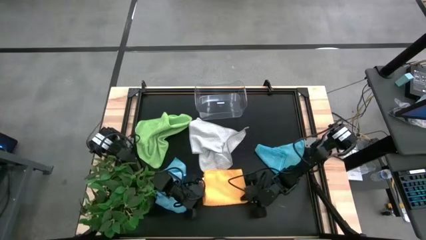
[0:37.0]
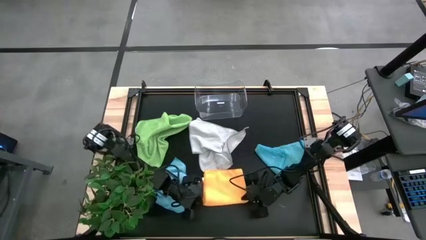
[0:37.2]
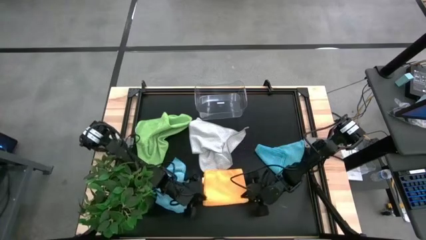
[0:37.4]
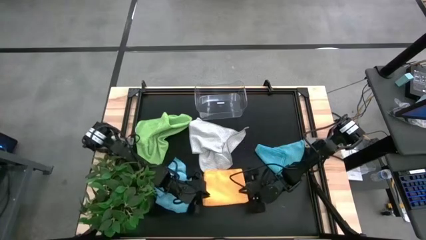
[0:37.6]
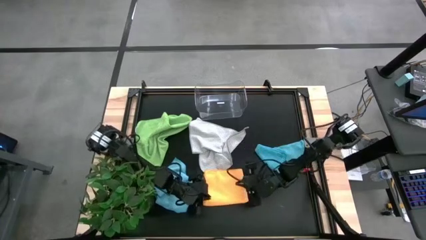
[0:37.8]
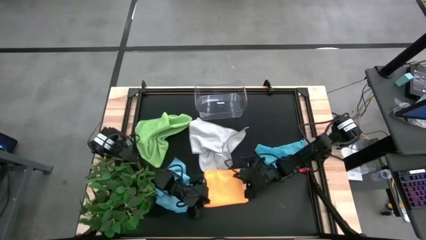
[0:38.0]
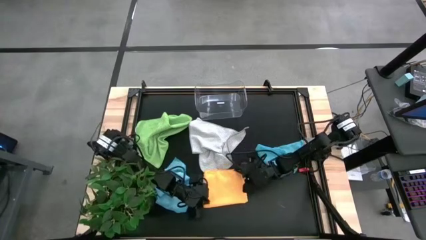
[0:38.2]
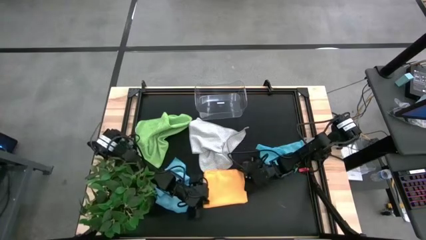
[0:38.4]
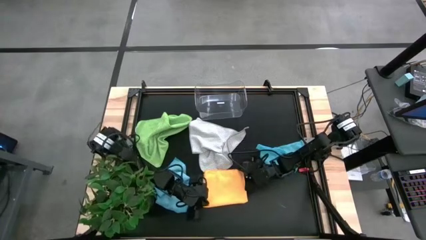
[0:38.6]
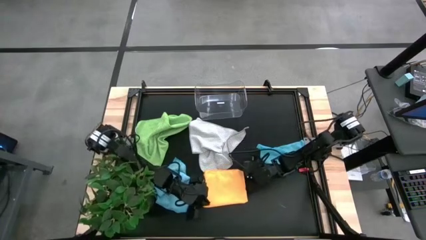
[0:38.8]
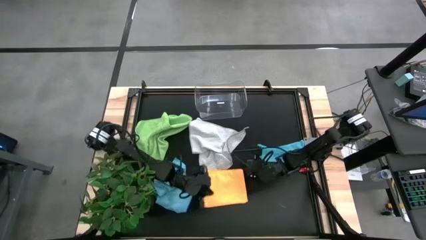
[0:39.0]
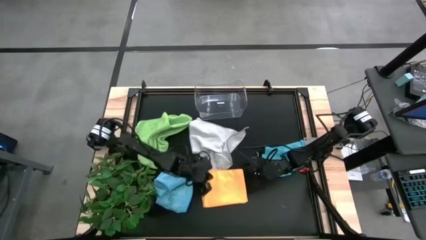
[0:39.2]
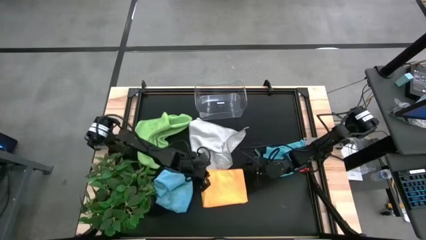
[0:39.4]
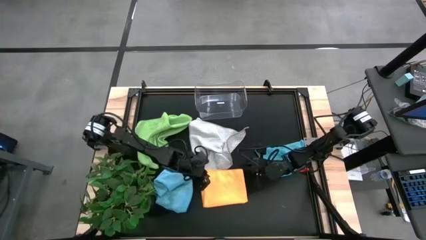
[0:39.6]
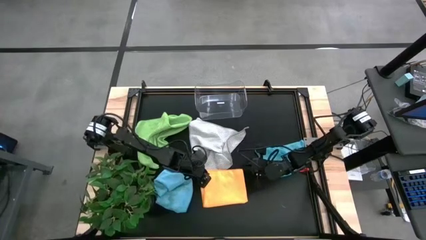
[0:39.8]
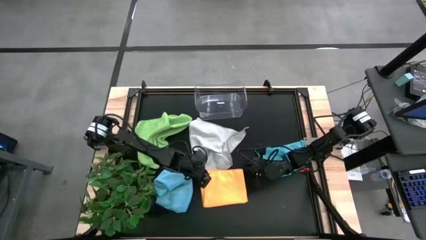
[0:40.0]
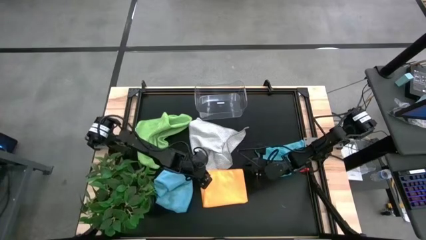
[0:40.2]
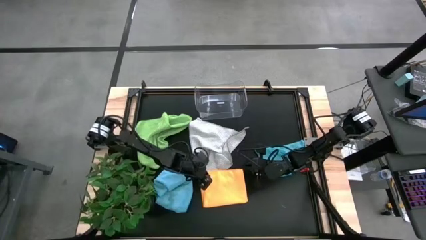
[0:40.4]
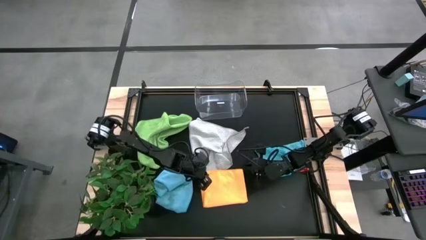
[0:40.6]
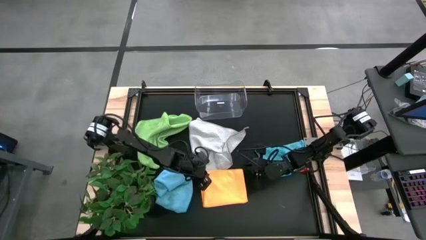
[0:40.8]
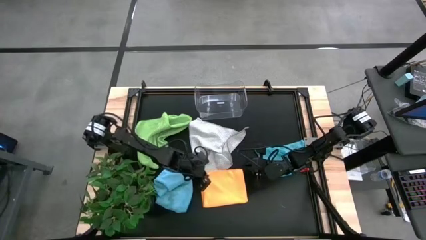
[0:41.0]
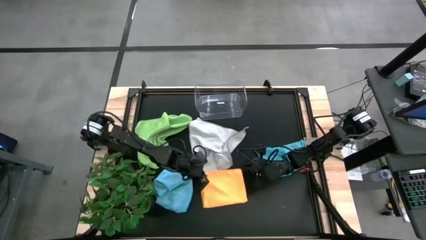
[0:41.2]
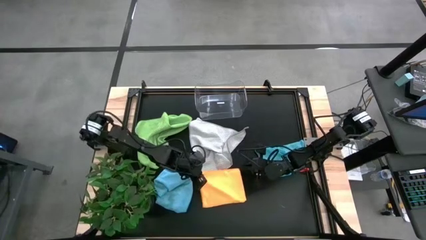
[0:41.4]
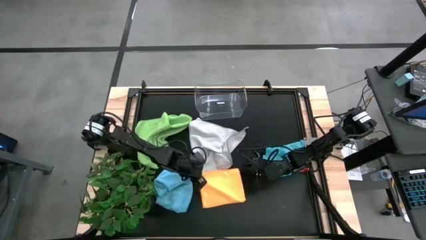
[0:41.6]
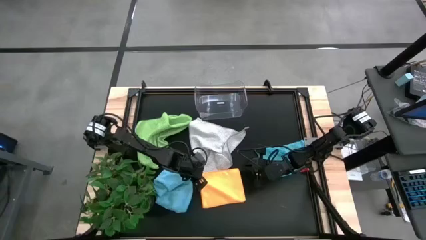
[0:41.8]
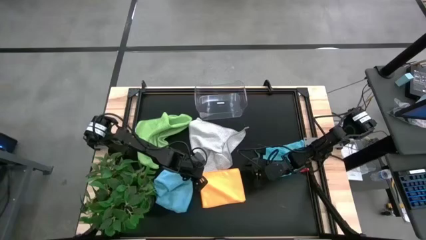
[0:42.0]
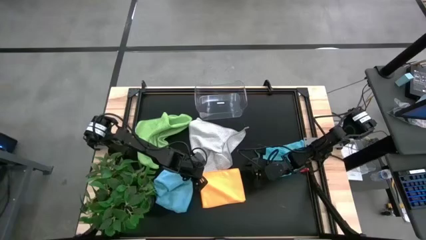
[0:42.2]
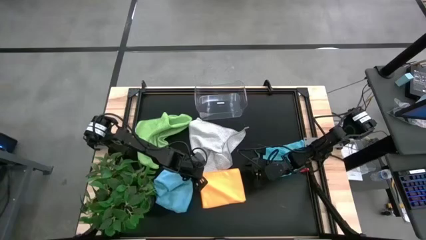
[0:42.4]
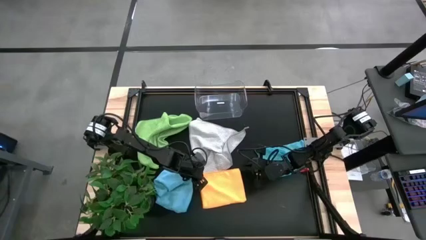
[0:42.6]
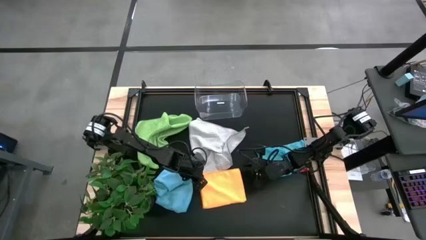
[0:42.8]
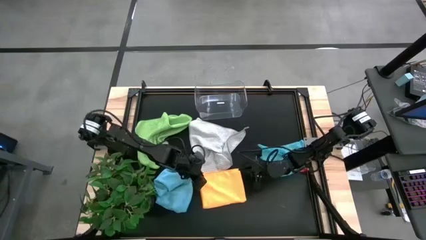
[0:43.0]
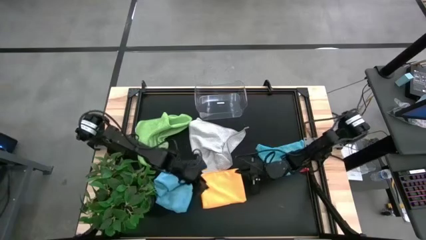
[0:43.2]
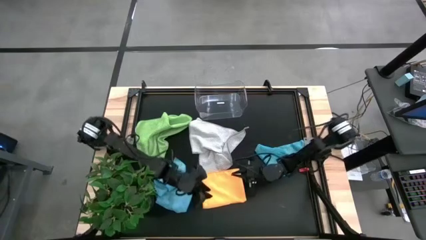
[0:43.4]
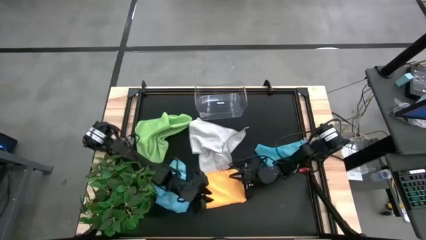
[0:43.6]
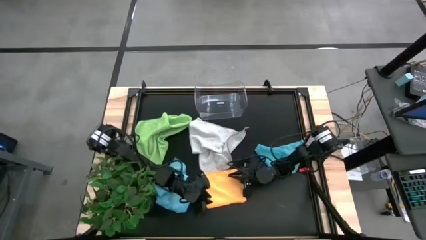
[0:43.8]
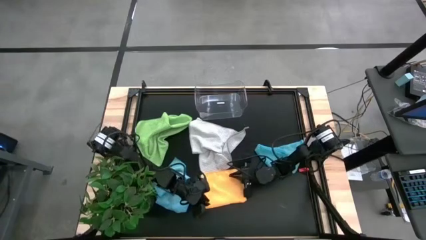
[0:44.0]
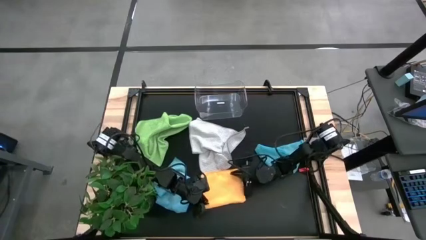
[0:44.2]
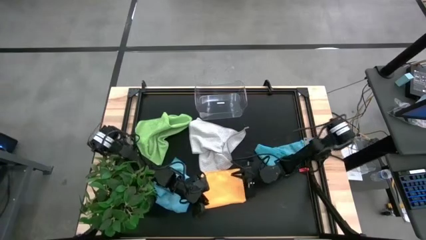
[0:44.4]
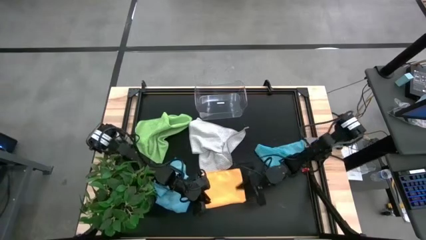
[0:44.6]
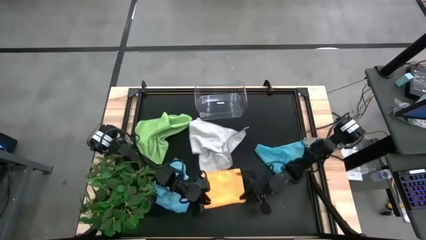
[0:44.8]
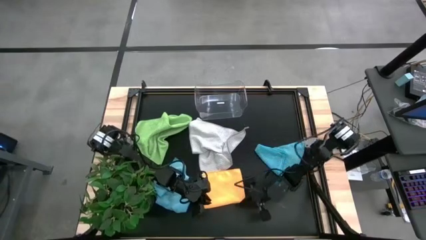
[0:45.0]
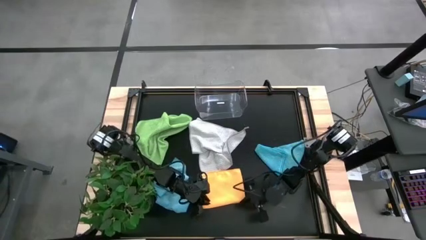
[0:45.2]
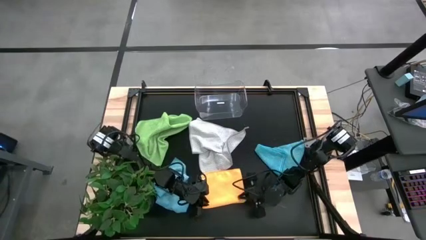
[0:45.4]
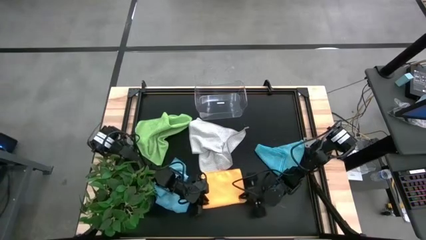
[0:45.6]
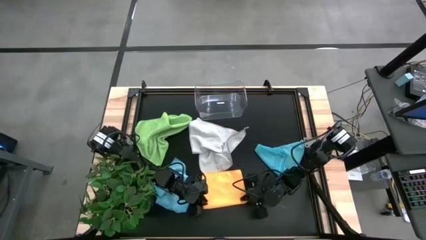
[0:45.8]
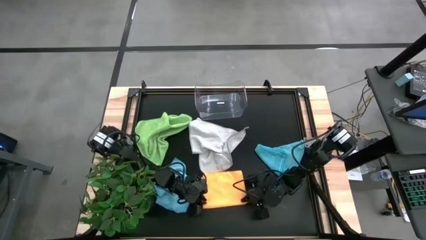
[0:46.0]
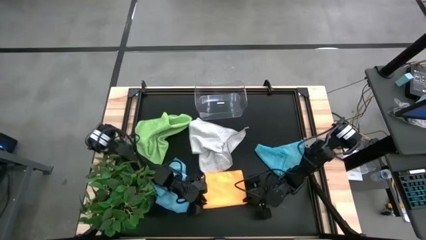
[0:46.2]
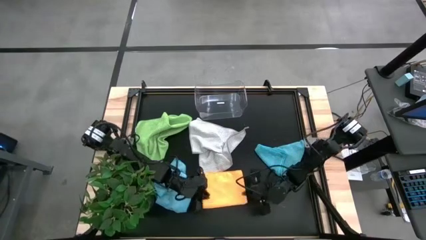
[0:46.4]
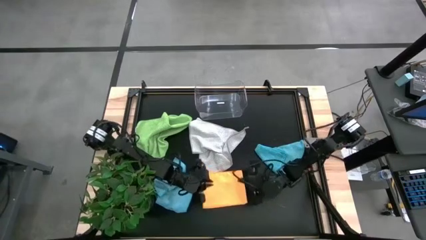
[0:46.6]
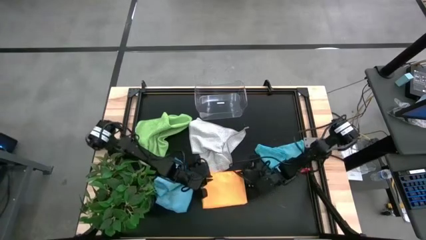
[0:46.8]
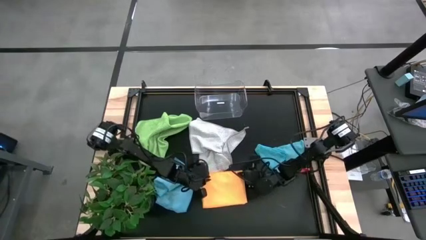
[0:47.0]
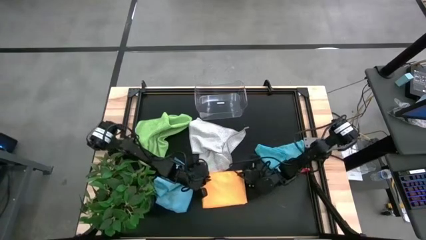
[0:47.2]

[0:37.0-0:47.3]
Task: Fold microfiber towels
Fold the orange microfiber cloth

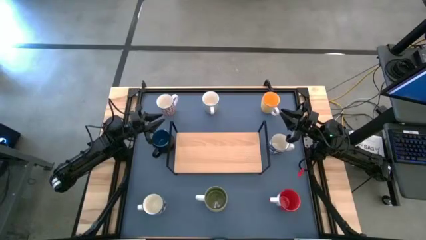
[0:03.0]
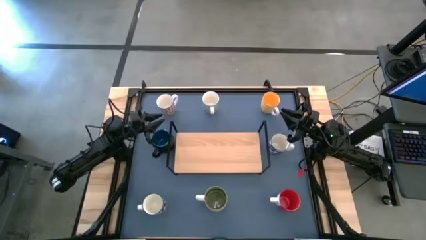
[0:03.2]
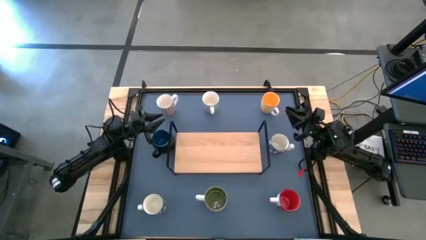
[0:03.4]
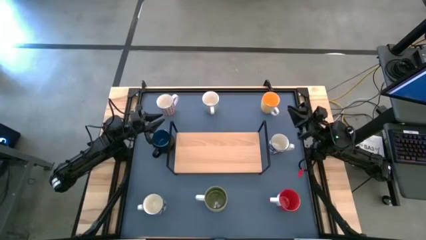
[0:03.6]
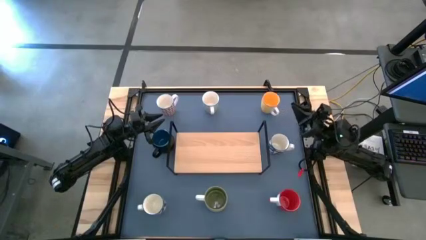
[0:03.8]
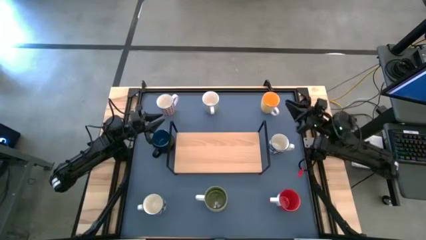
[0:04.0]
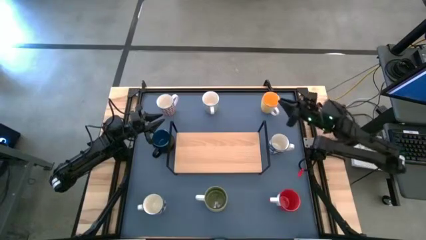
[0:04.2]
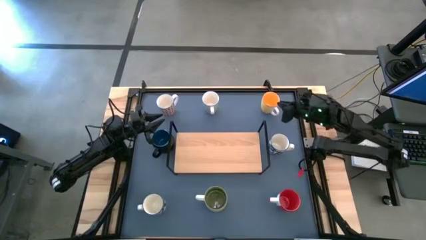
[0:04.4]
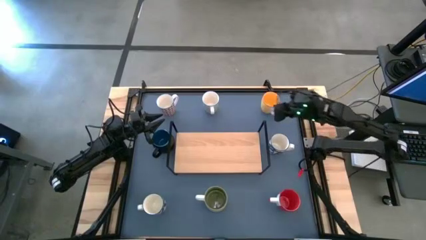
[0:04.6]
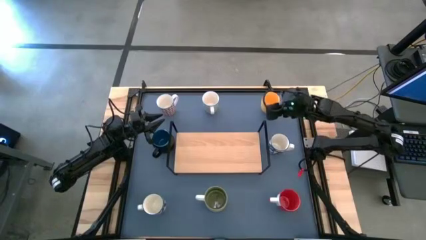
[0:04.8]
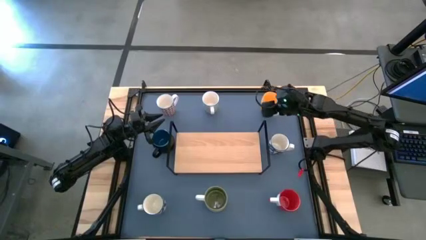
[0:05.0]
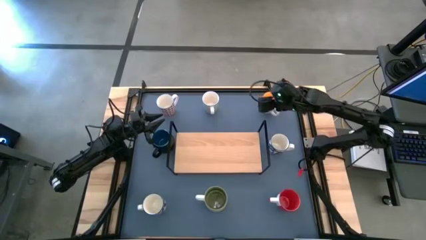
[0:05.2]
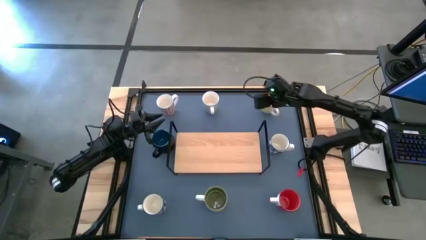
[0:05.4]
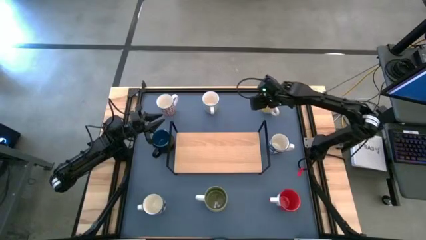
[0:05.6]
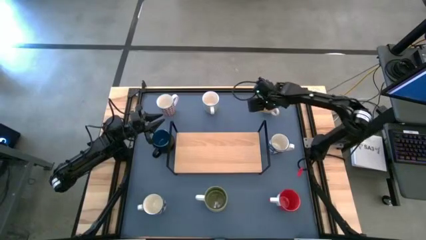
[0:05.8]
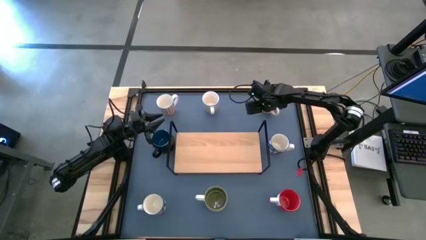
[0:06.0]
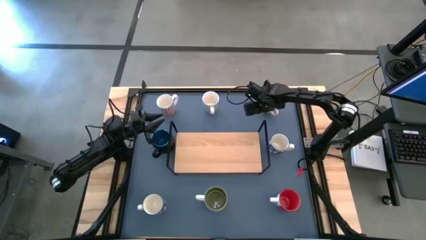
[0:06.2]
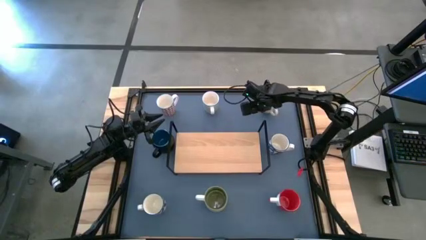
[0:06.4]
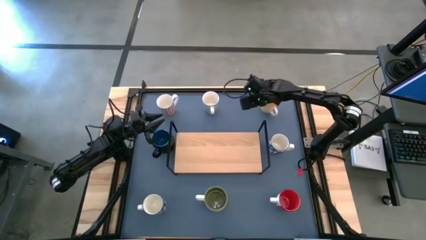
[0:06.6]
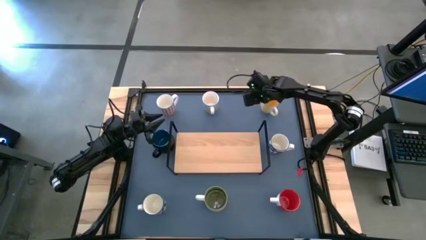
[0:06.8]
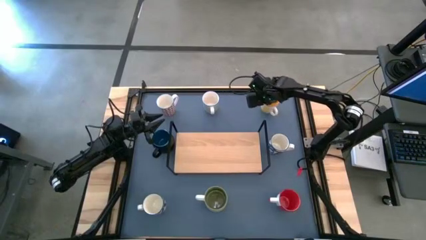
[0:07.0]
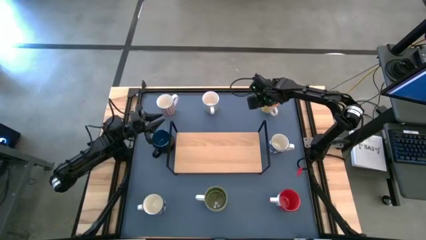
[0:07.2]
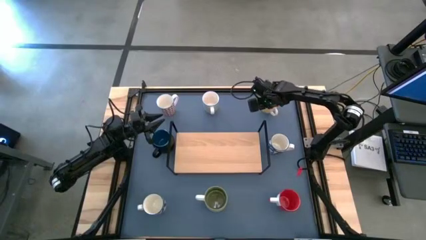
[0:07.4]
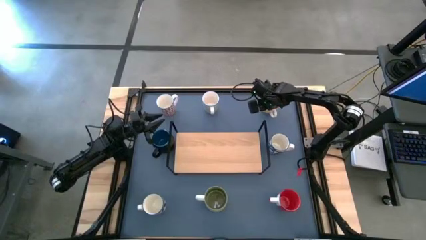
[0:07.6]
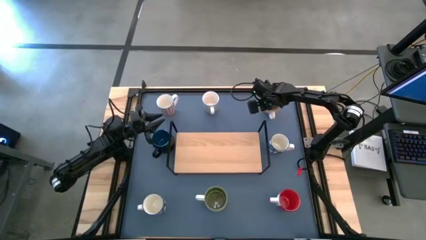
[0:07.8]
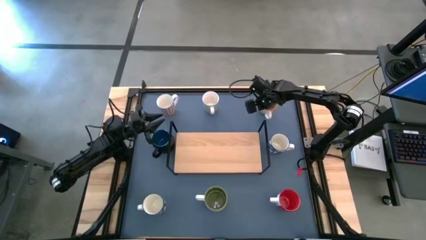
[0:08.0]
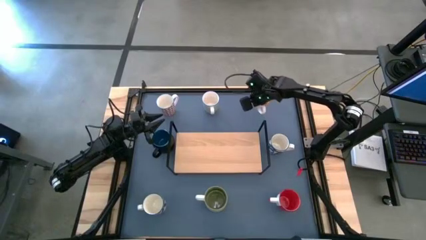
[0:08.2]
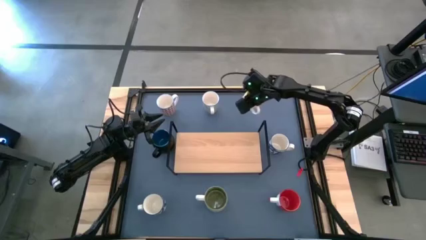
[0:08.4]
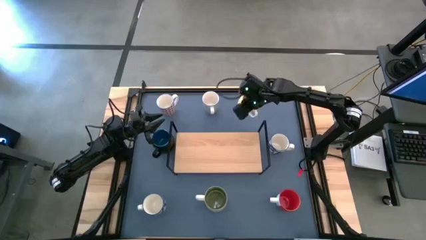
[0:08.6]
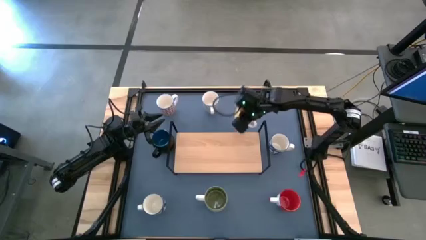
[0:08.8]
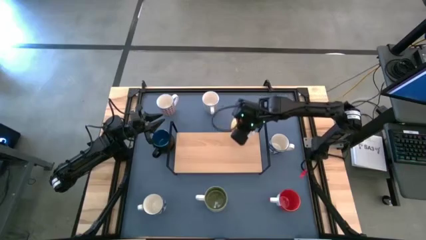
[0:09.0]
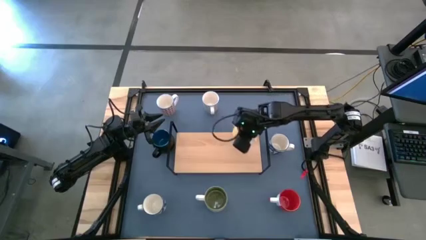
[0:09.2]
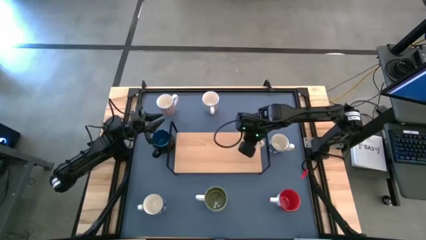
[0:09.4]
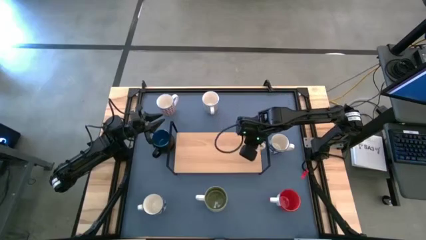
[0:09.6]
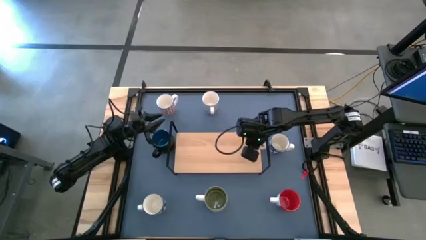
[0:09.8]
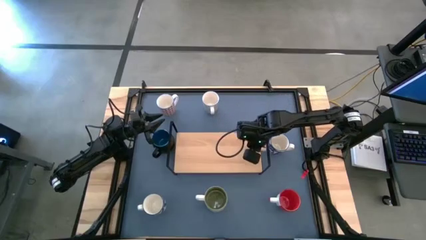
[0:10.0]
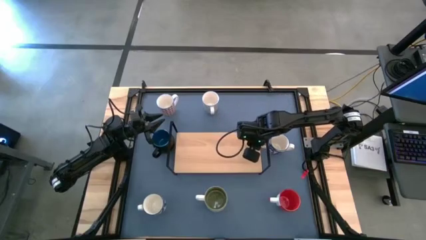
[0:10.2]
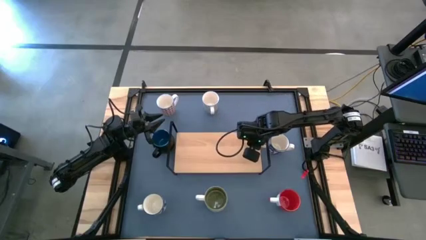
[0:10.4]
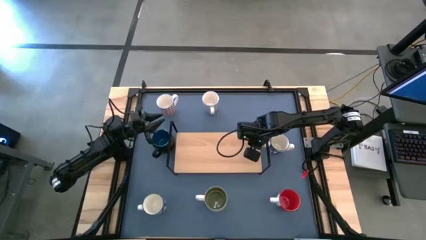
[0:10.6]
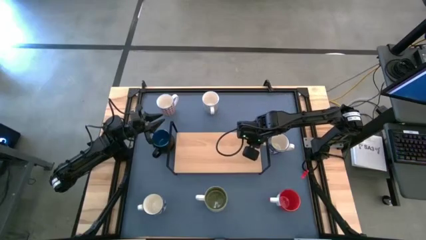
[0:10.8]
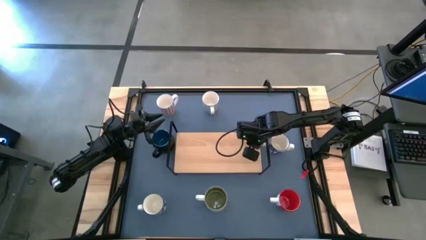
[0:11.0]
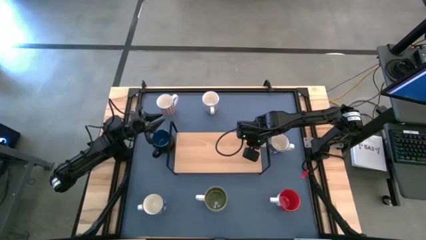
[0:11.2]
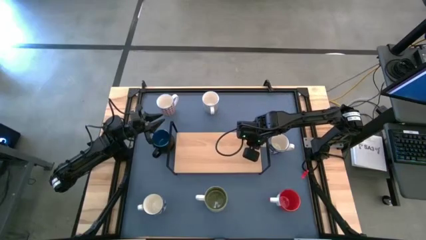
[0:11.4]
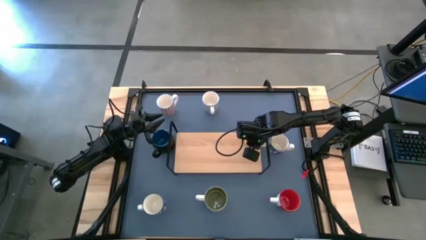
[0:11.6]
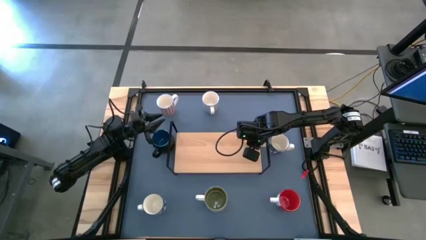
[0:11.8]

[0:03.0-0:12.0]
Task: Place coffee mugs
Put the yellow mug on the shelf
